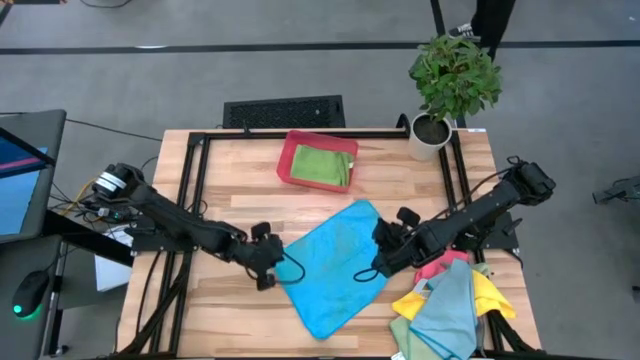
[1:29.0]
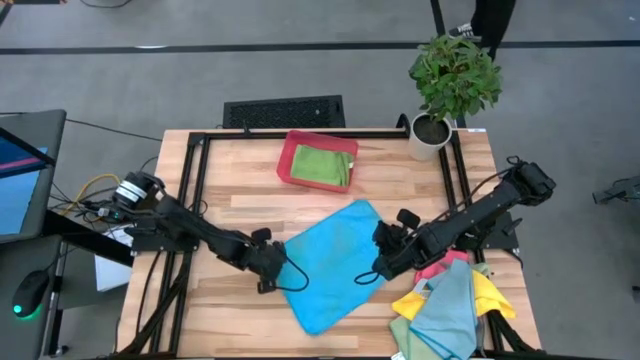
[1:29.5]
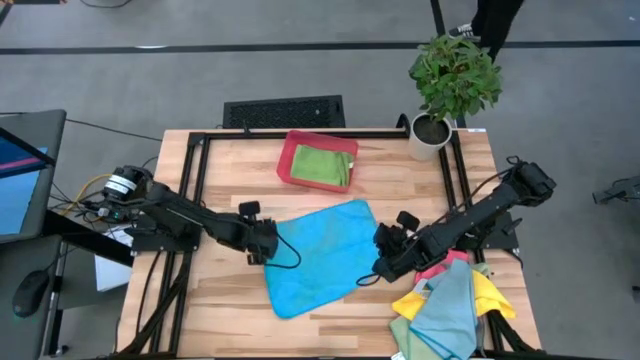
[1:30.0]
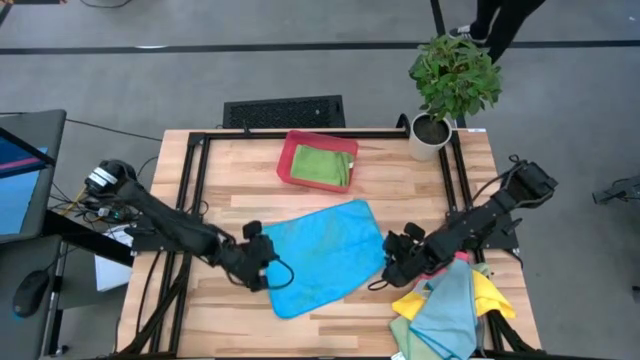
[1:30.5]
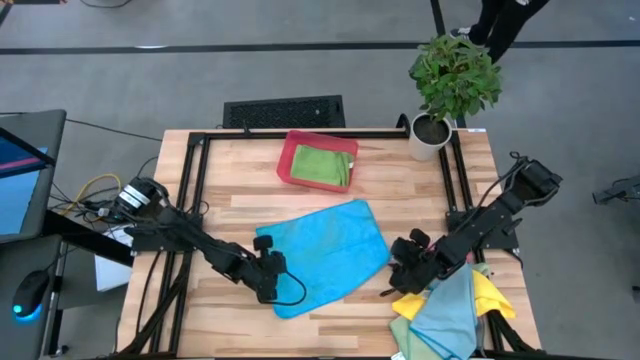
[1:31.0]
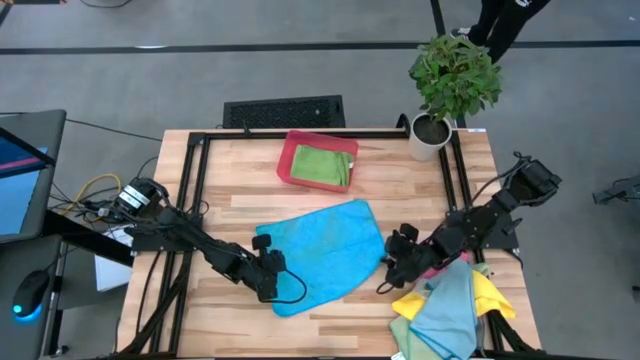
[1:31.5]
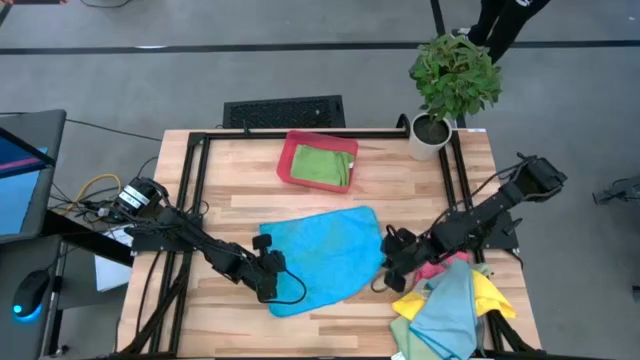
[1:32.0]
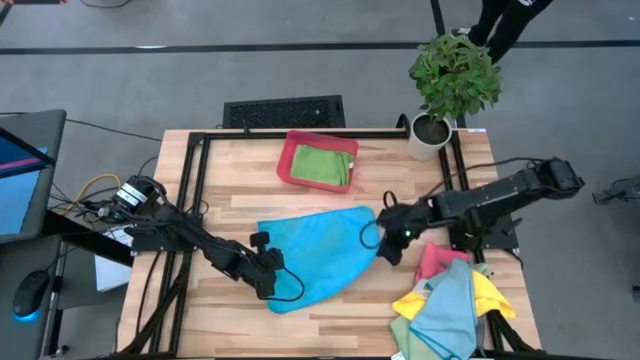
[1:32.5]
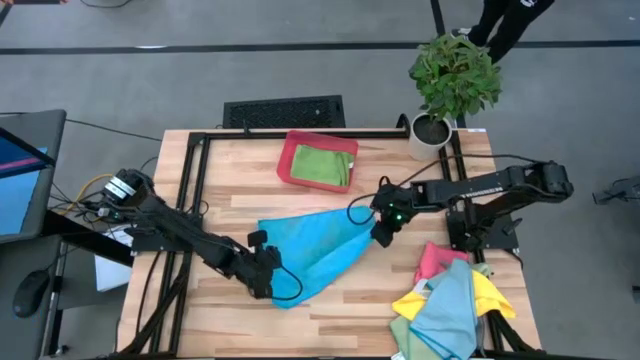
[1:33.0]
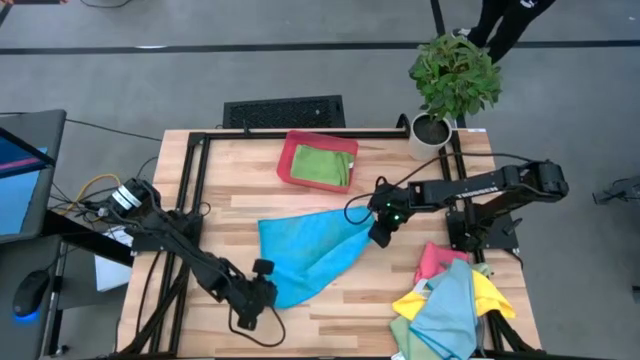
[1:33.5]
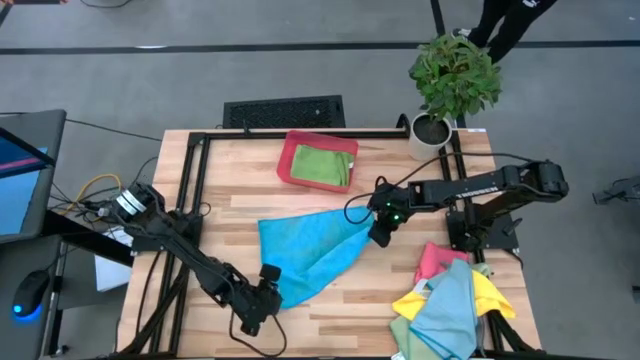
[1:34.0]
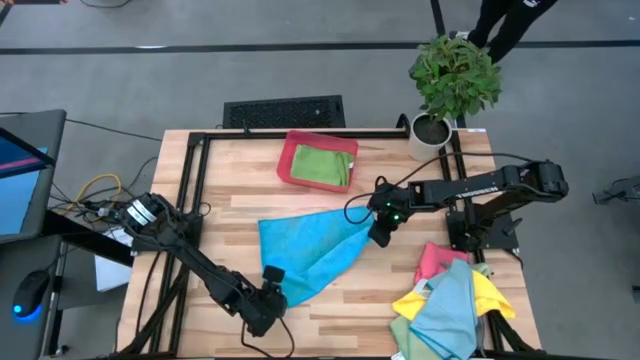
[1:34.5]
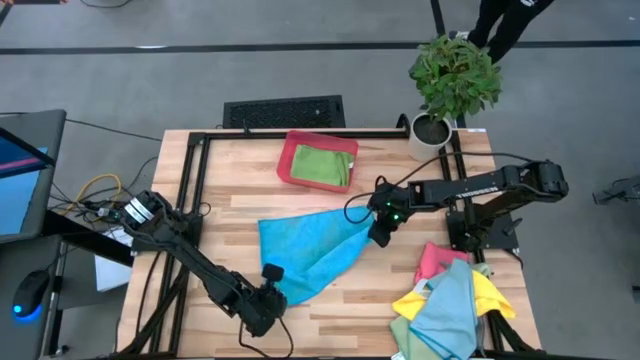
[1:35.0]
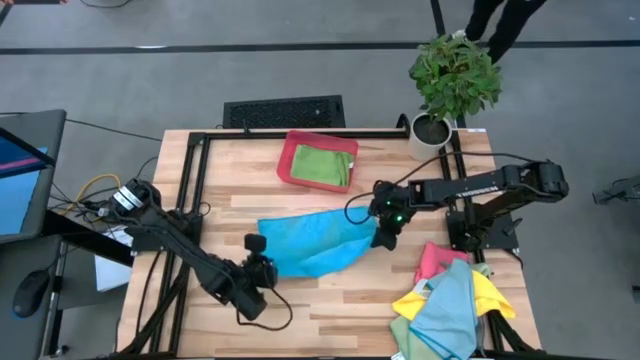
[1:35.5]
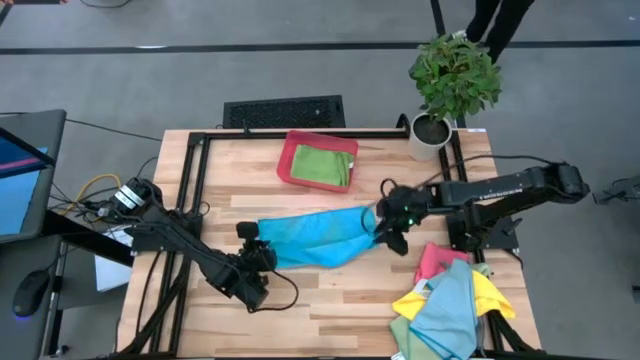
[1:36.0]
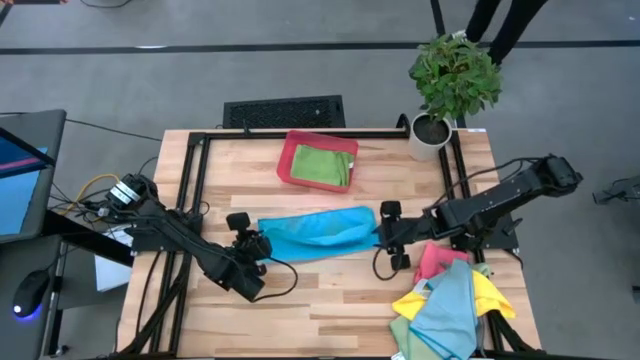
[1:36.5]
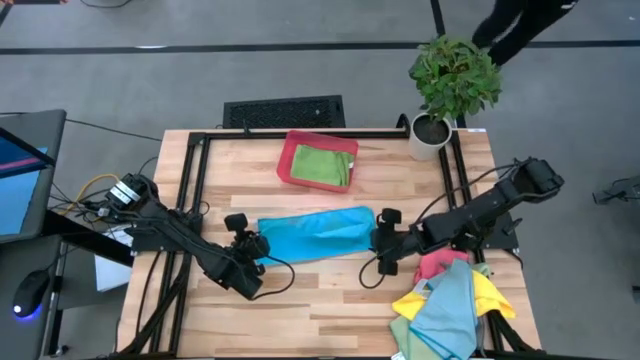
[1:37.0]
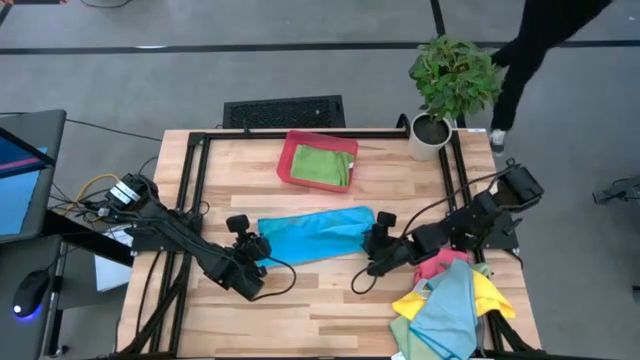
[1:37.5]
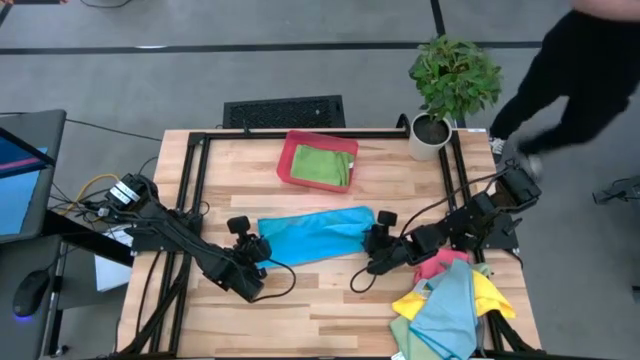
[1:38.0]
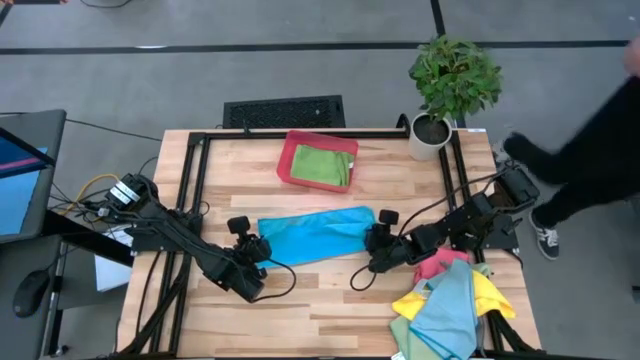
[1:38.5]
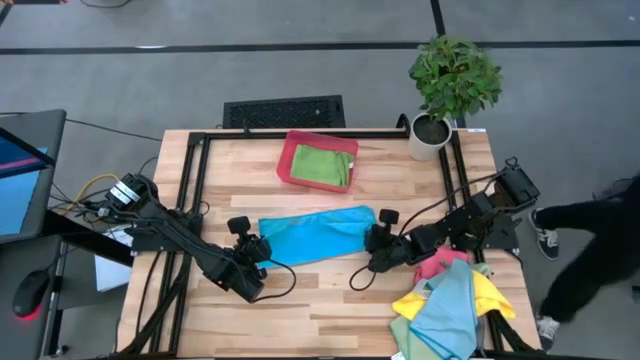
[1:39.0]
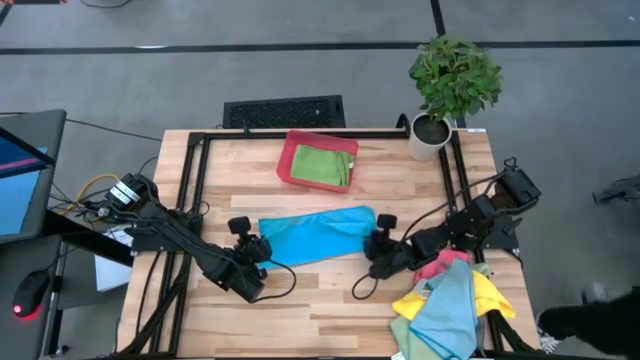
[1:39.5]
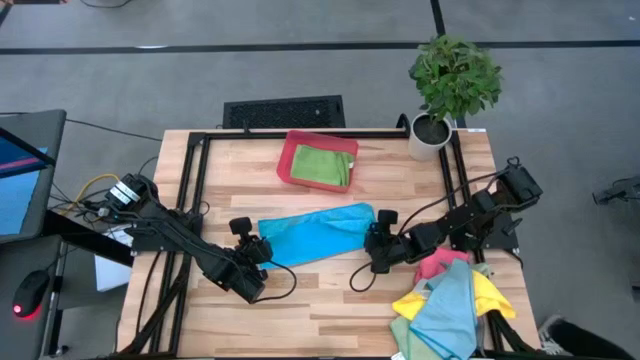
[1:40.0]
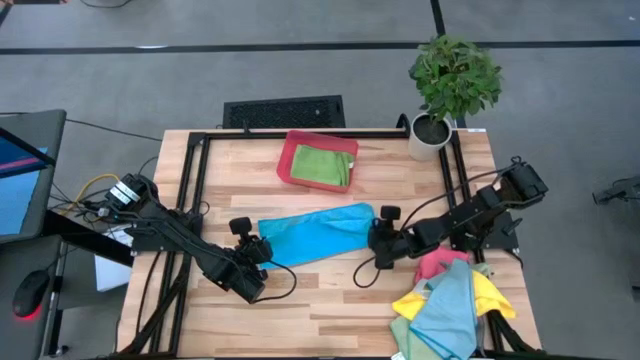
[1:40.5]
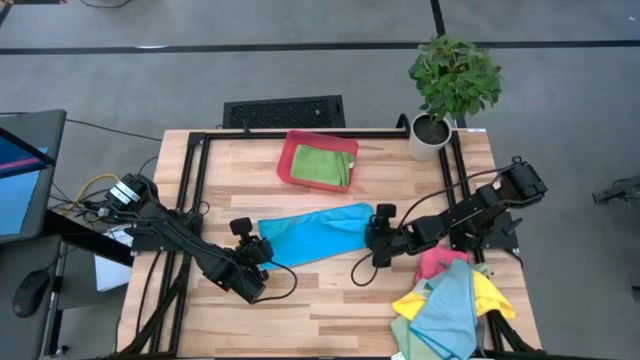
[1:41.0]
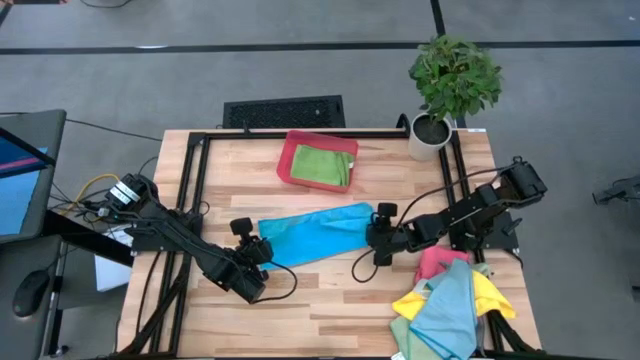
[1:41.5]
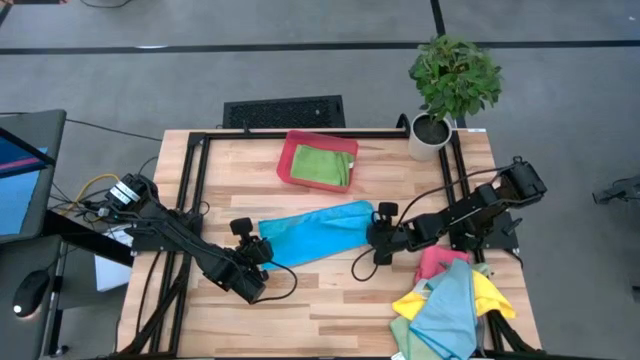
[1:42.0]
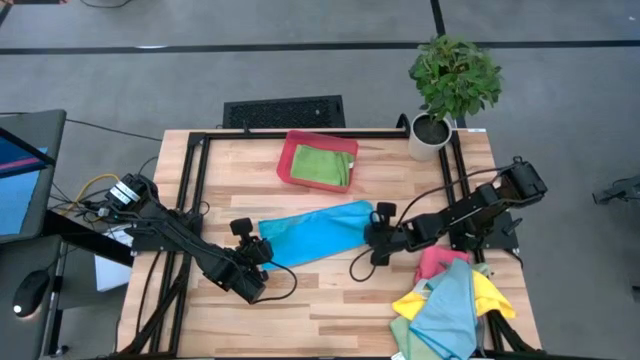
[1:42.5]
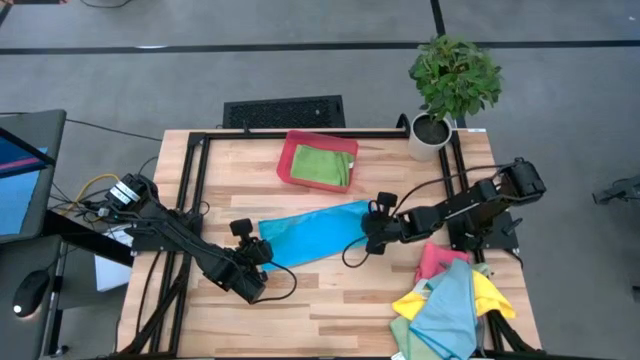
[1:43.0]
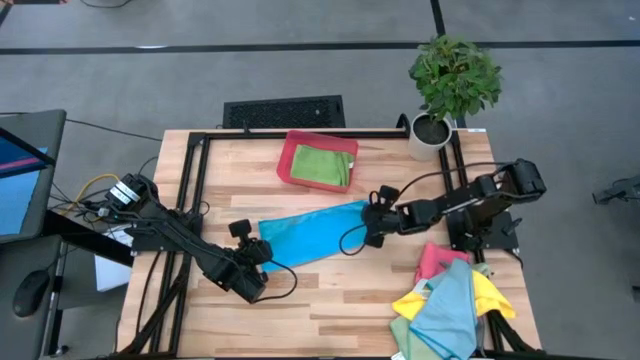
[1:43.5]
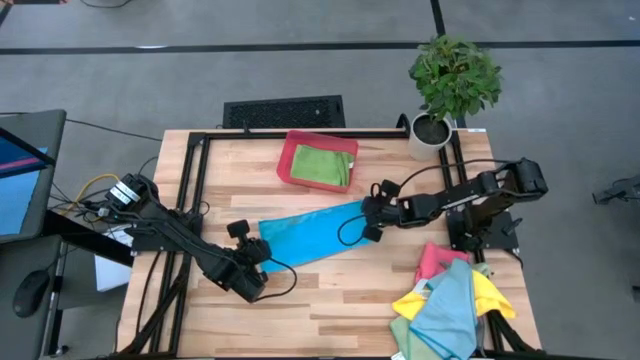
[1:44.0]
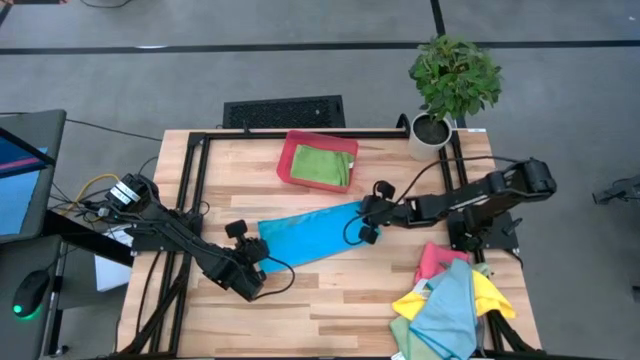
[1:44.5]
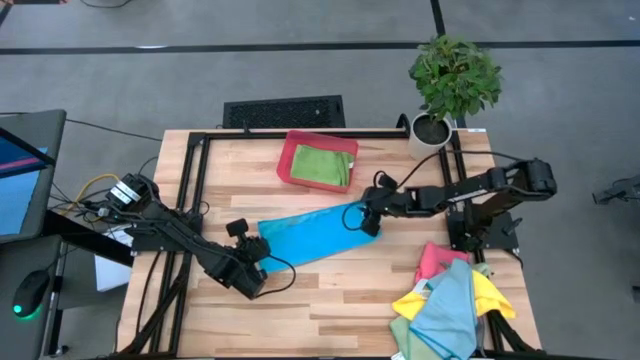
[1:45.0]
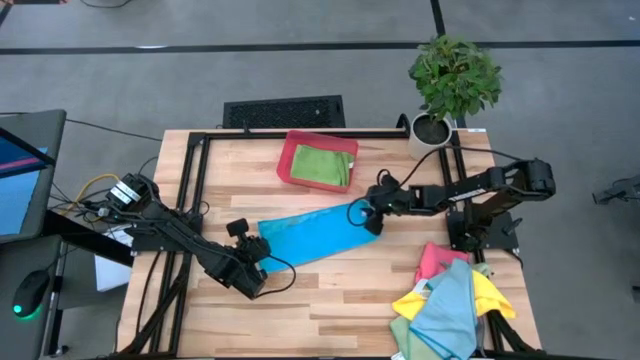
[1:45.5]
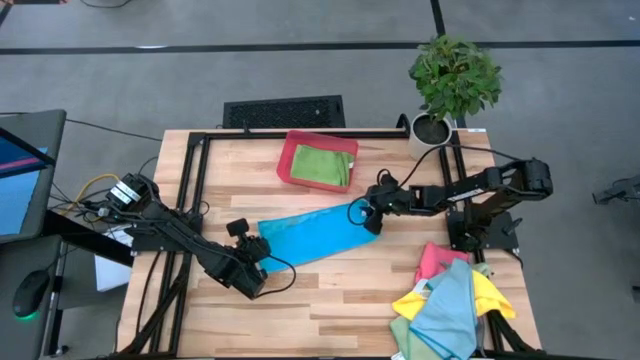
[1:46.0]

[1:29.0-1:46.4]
Task: Fold microfiber towels
Fold the blue microfiber cloth

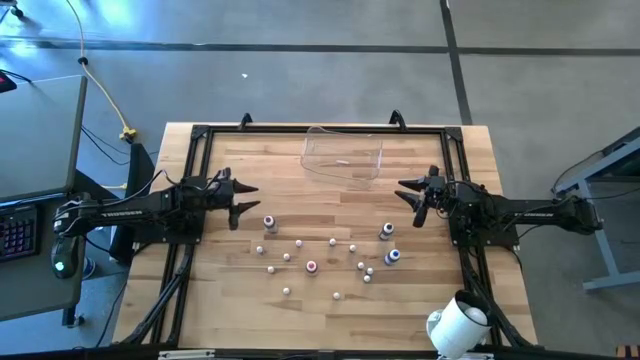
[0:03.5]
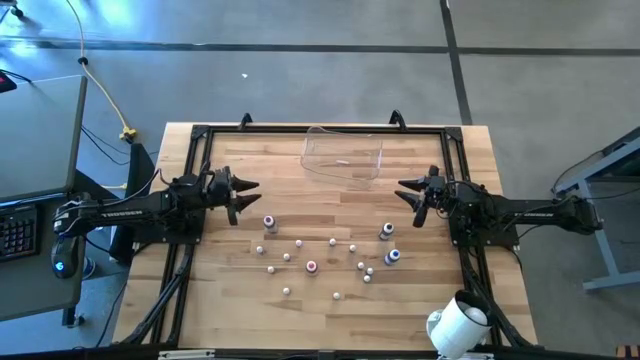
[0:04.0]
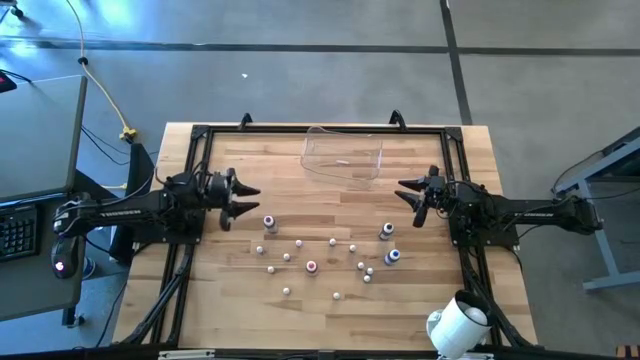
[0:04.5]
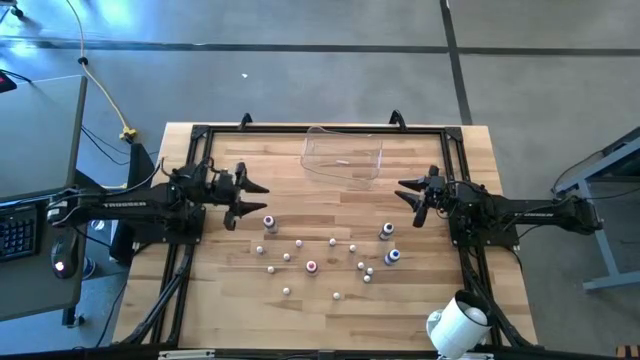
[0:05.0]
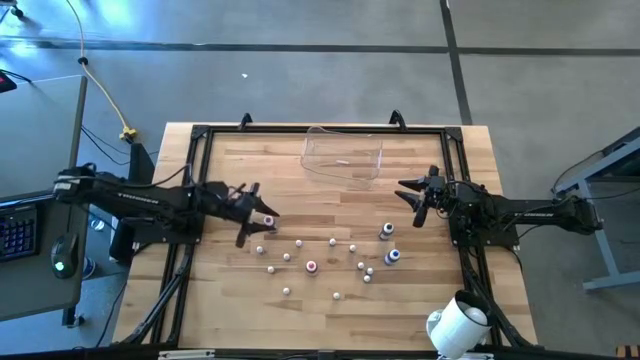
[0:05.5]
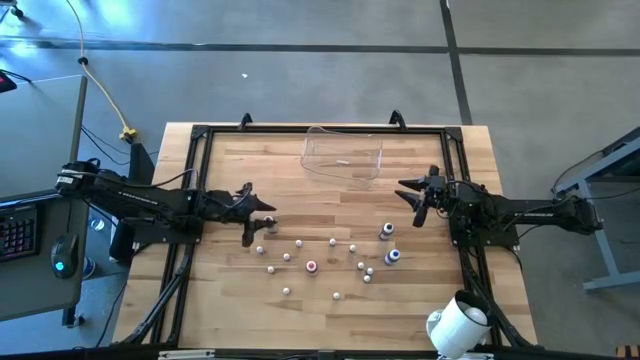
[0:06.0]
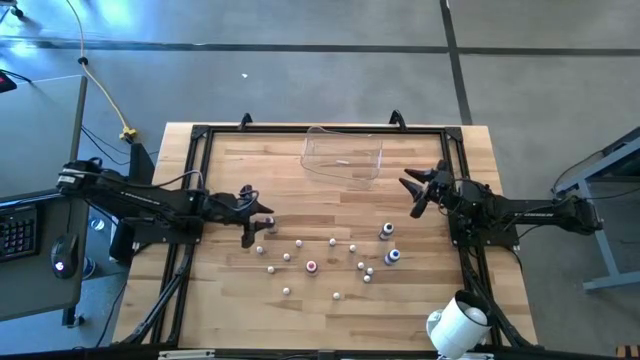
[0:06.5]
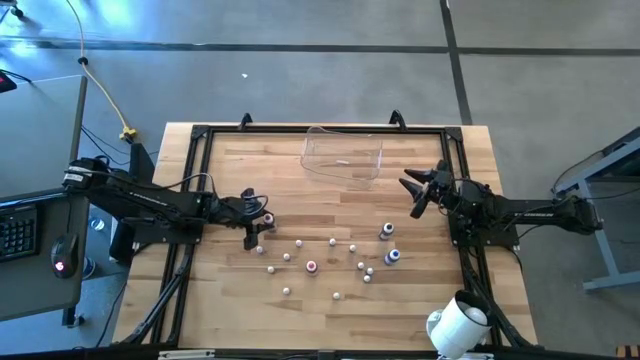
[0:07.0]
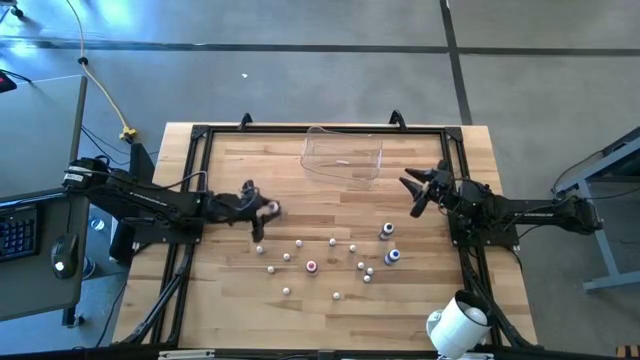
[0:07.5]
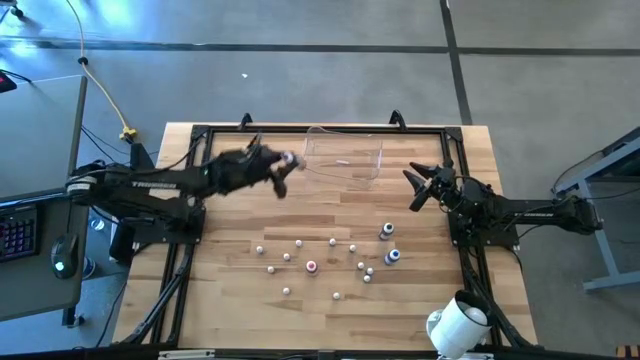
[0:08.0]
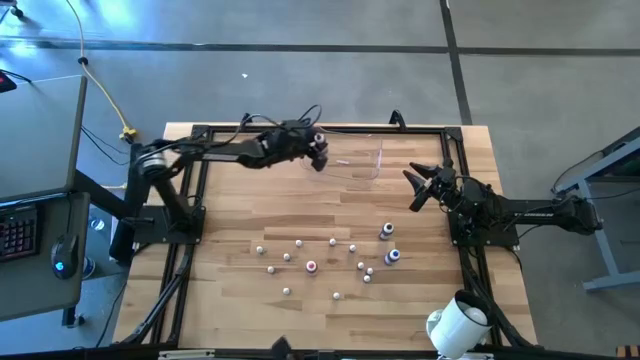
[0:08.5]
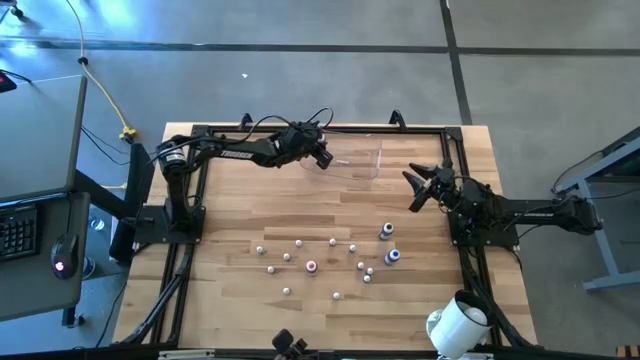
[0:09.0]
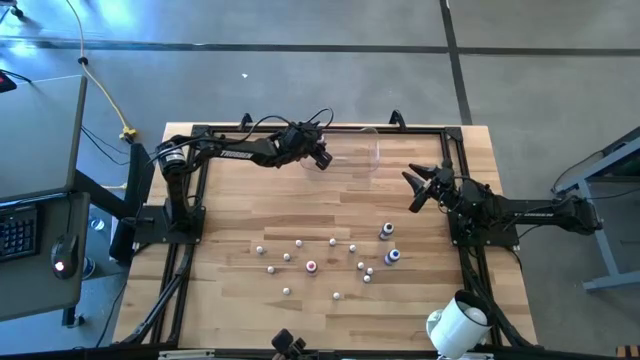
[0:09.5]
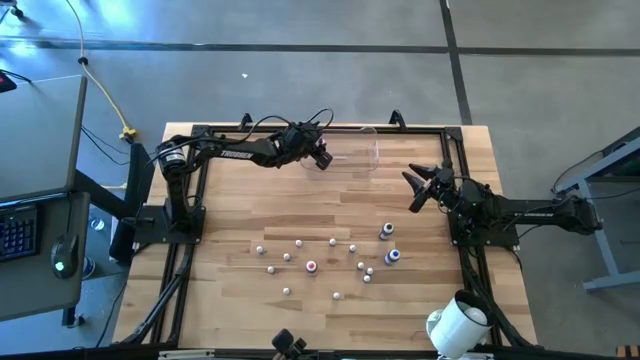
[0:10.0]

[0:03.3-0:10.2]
Task: Pick & Place food coloring
Put the purple food coloring into the transparent bin
